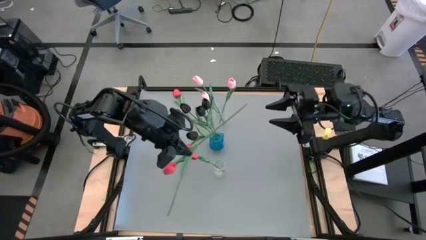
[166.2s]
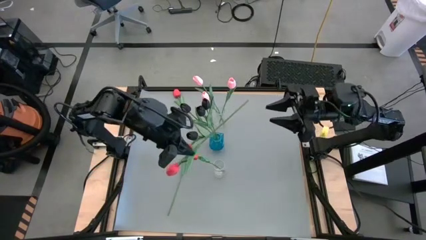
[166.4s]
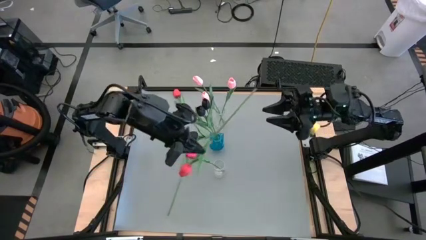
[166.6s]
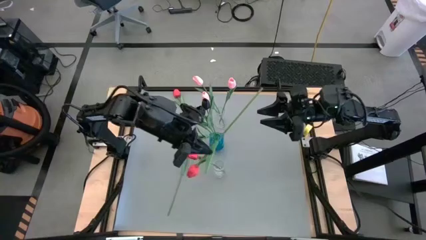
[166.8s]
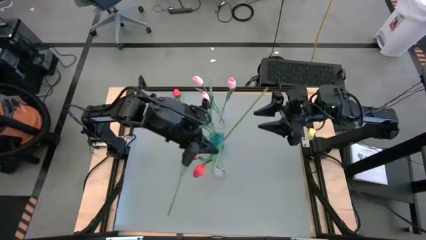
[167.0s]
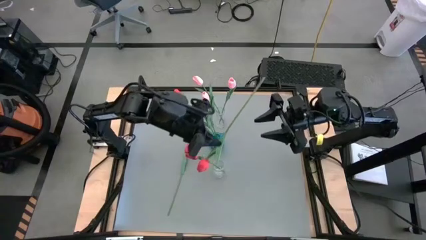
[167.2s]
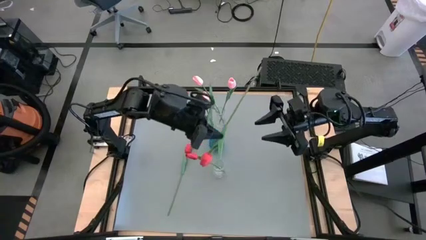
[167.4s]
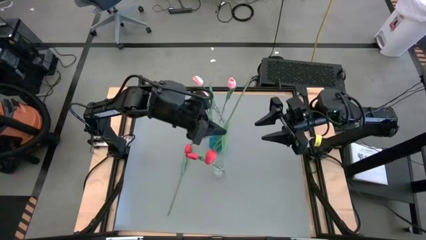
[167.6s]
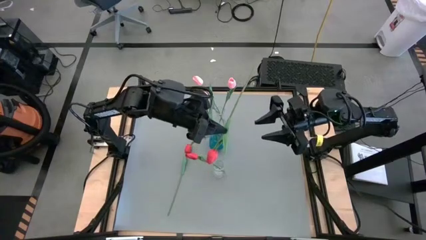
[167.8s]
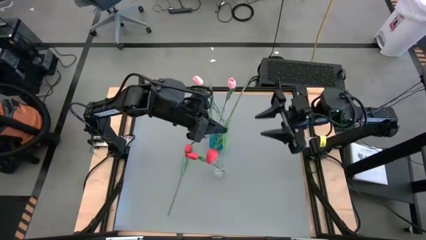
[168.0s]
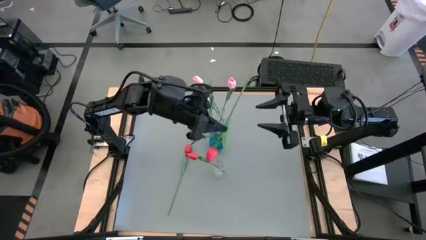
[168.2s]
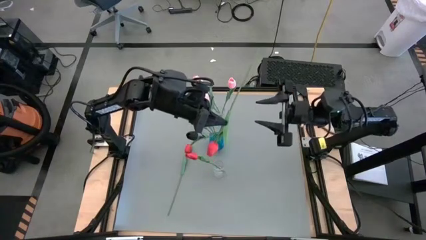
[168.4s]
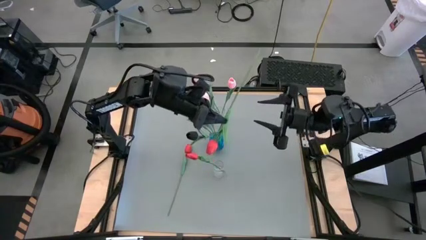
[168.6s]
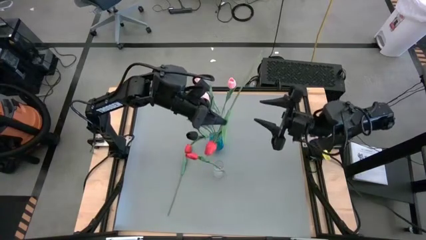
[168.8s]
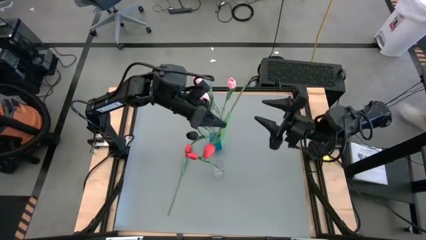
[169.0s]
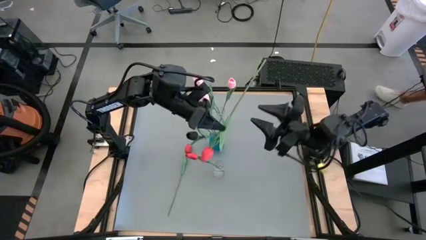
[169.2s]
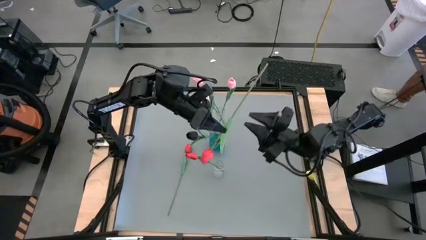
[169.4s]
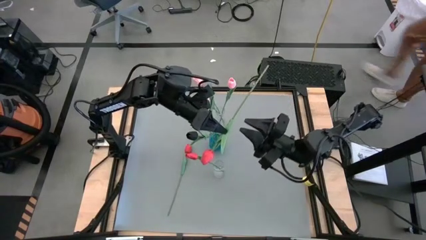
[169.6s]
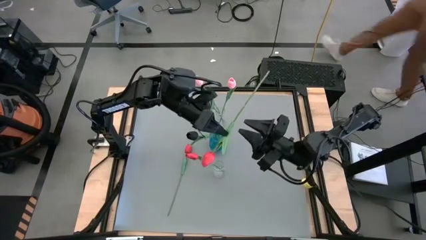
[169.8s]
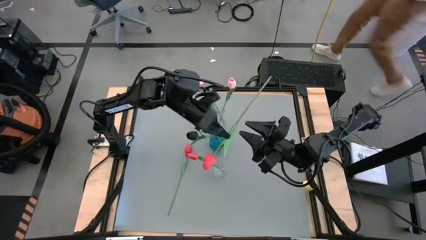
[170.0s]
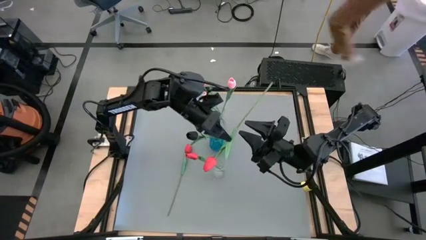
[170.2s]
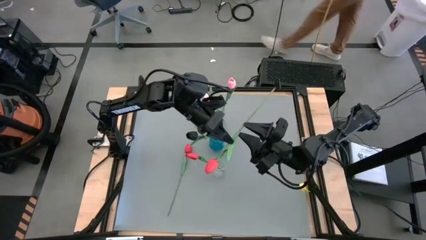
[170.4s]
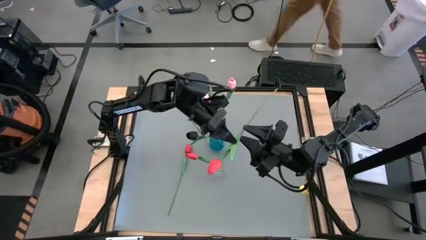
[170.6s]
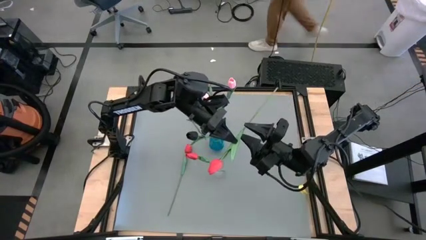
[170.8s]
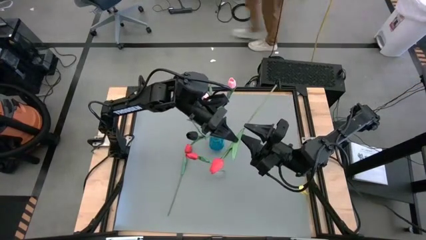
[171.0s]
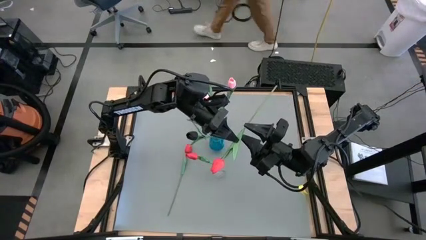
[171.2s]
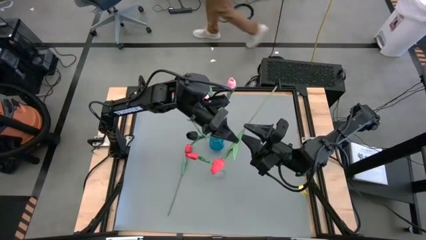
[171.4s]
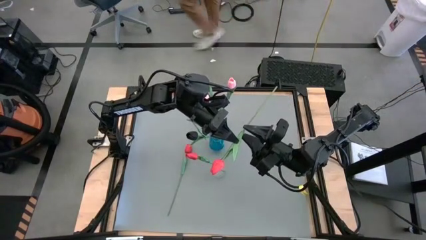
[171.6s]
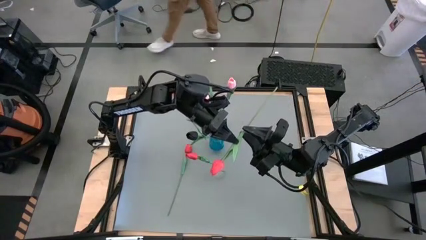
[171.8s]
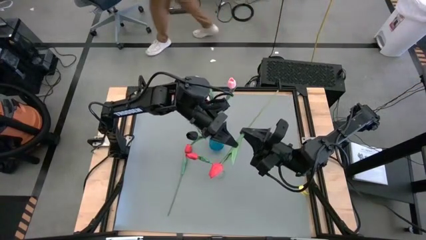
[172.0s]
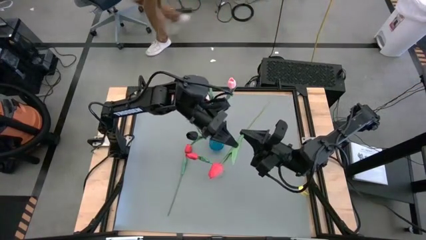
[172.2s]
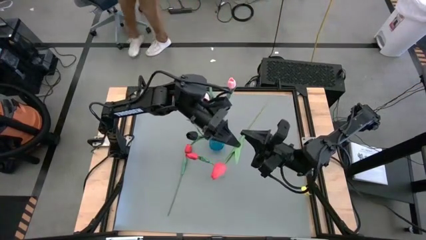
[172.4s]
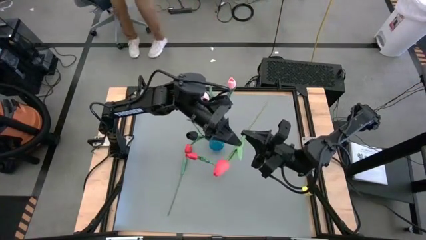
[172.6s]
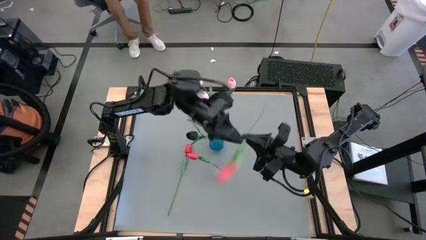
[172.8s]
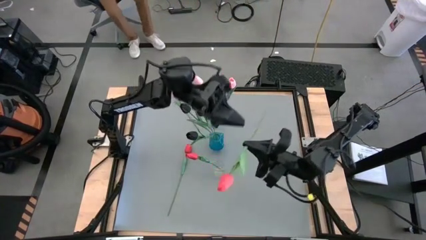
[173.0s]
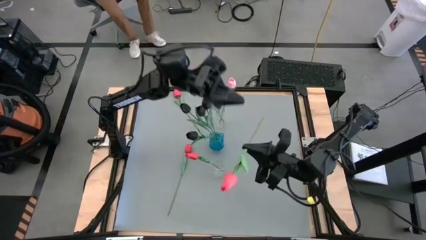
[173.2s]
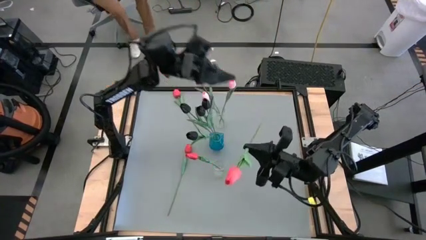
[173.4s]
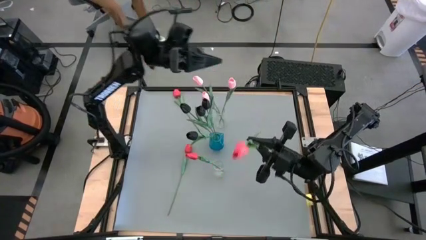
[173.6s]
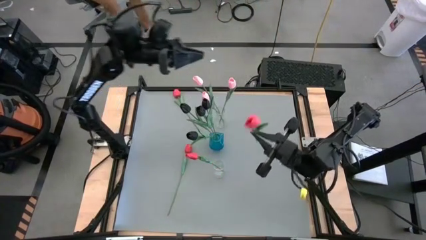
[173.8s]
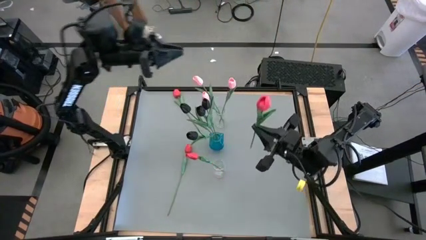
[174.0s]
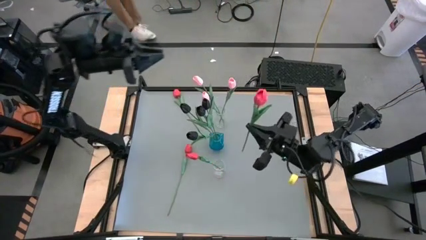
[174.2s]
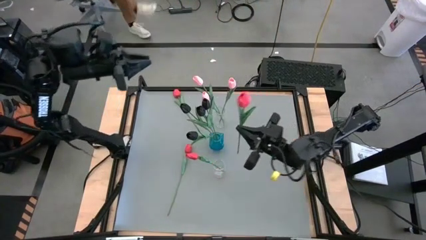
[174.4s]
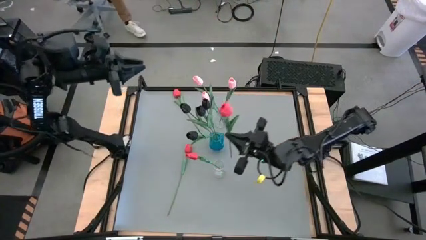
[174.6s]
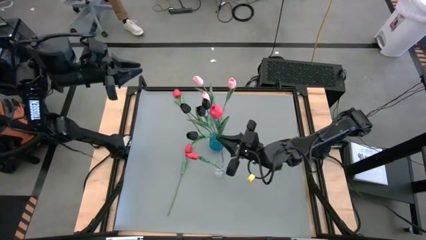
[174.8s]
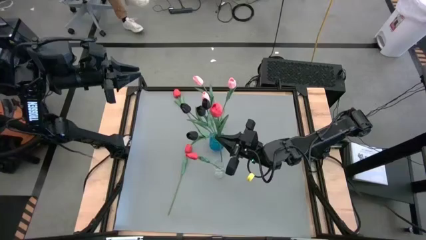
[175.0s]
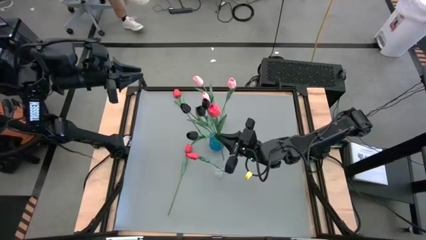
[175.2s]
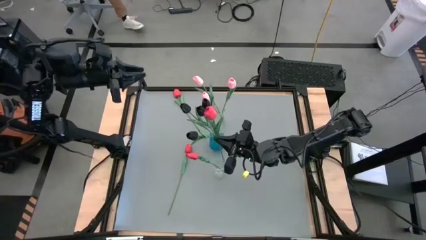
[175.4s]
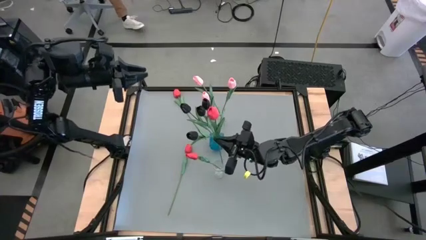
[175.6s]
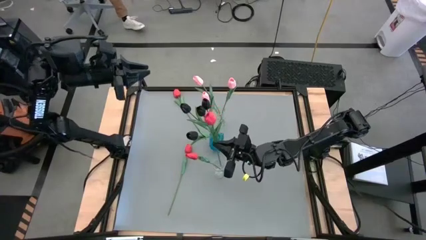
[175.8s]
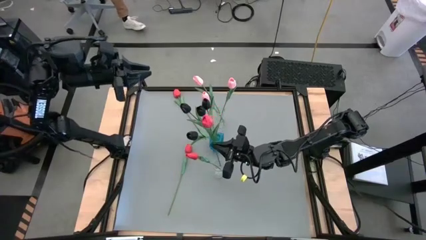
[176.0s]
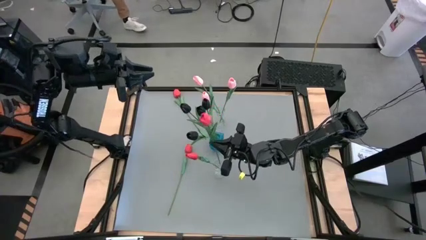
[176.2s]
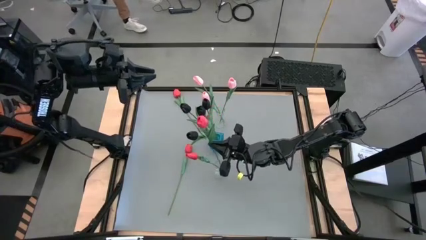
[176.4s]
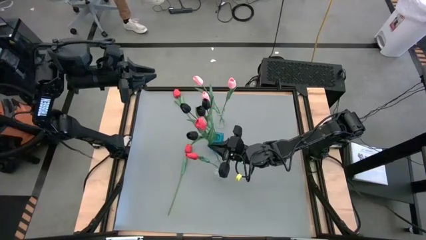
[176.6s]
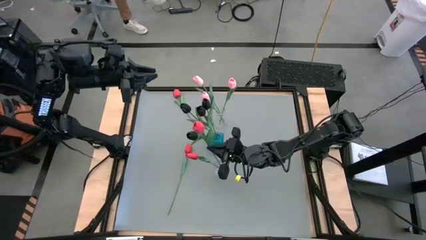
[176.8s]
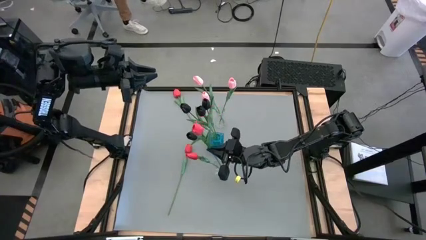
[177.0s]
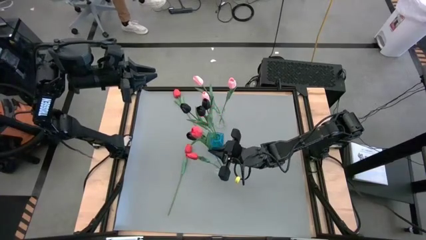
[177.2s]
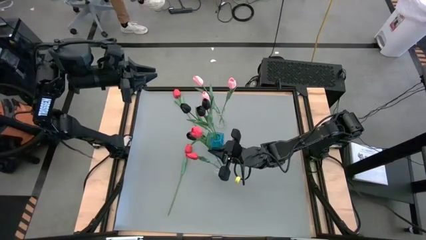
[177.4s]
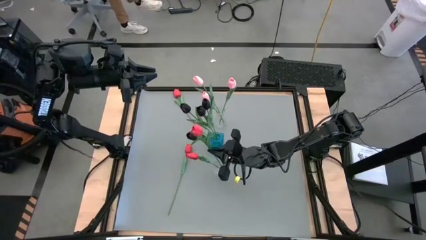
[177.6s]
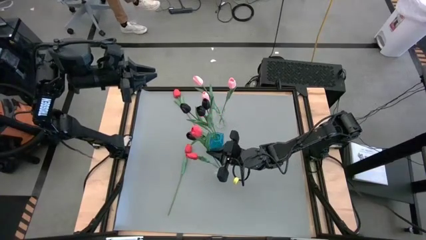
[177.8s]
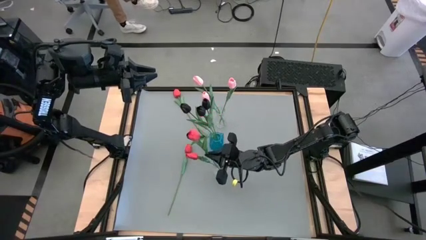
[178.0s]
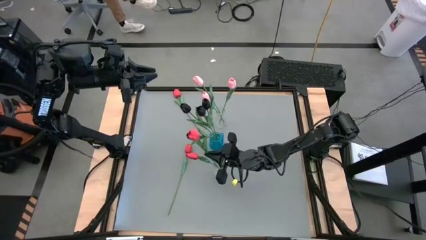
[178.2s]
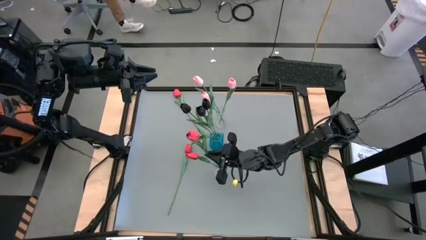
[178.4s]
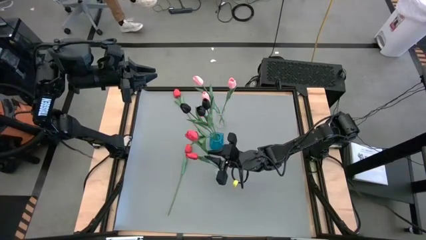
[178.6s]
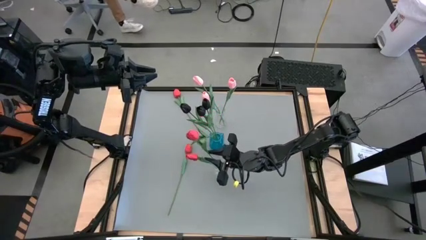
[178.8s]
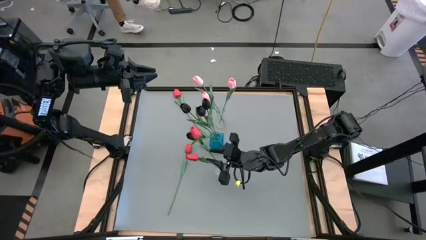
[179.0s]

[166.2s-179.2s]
Task: Sort flowers into vase by color
Put the bottom left red tulip into the bottom transparent vase
